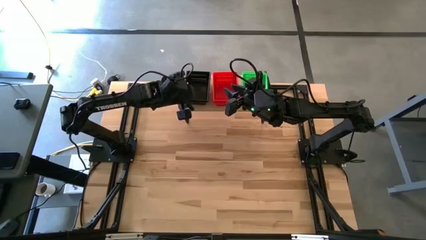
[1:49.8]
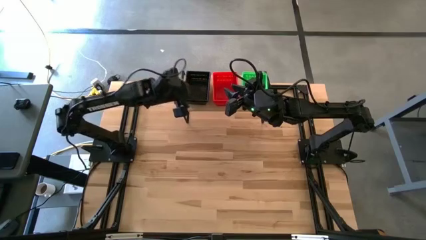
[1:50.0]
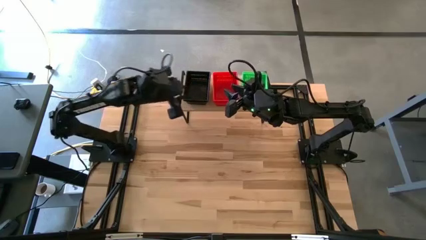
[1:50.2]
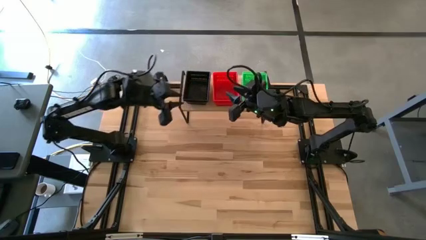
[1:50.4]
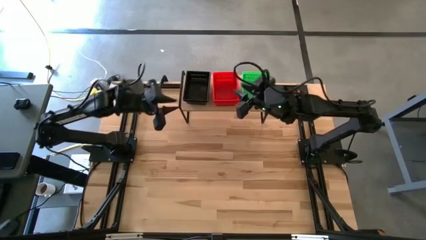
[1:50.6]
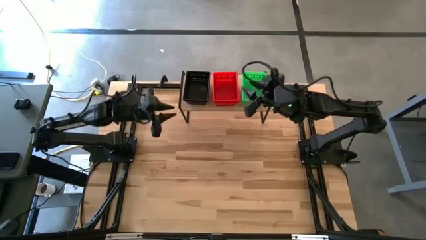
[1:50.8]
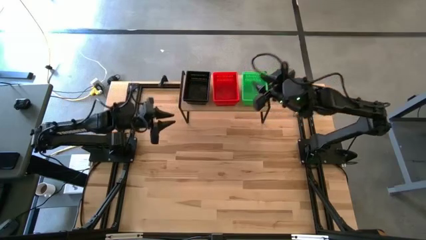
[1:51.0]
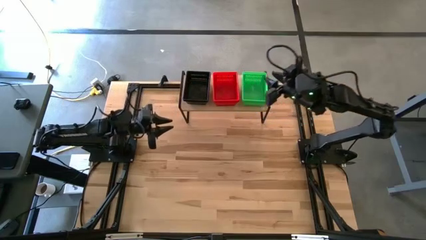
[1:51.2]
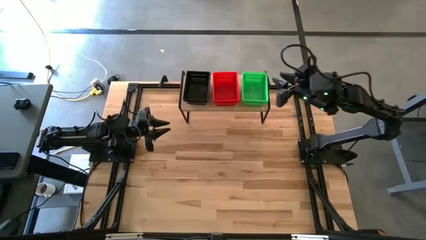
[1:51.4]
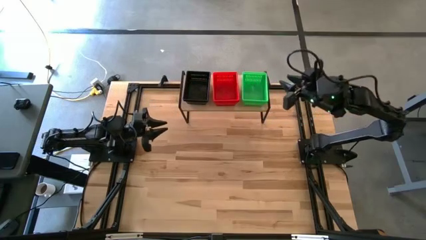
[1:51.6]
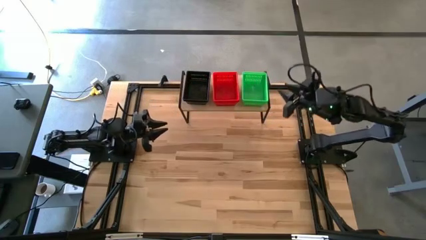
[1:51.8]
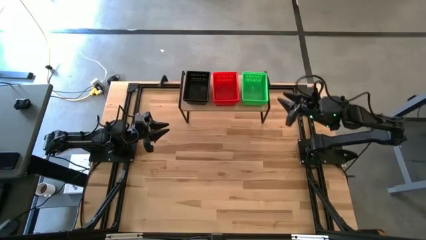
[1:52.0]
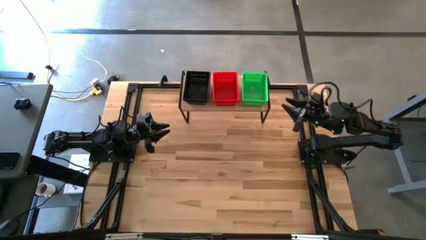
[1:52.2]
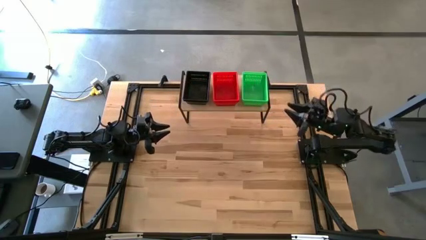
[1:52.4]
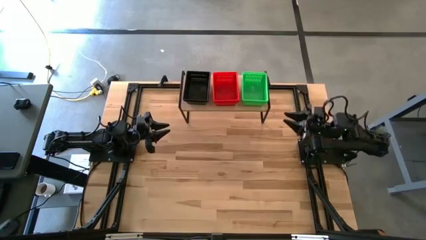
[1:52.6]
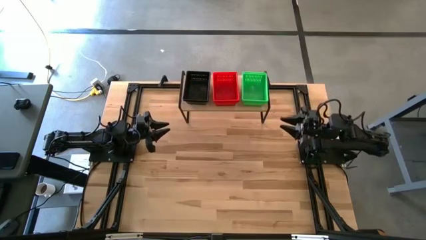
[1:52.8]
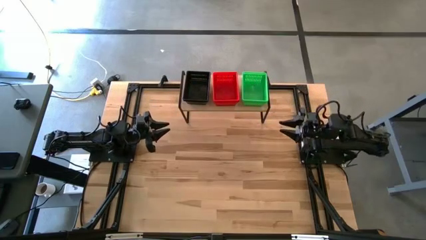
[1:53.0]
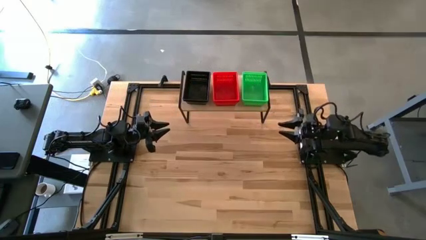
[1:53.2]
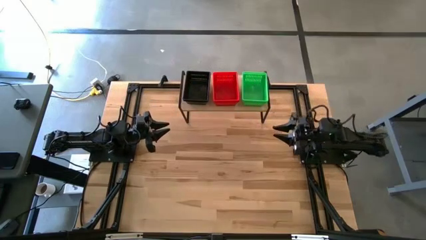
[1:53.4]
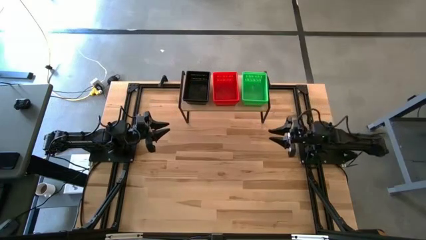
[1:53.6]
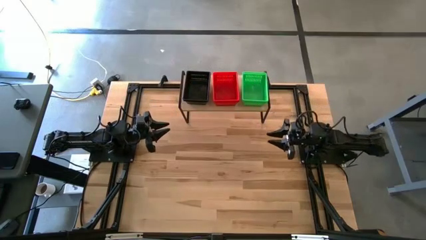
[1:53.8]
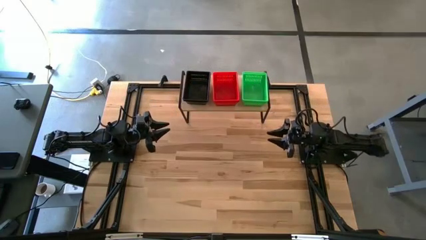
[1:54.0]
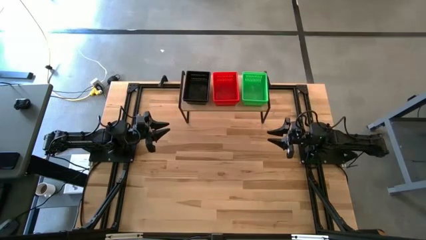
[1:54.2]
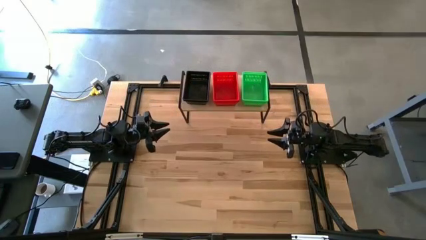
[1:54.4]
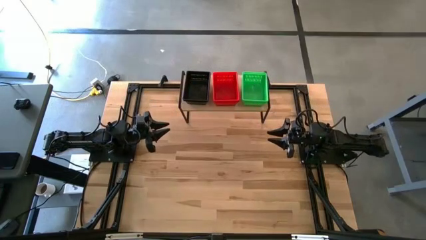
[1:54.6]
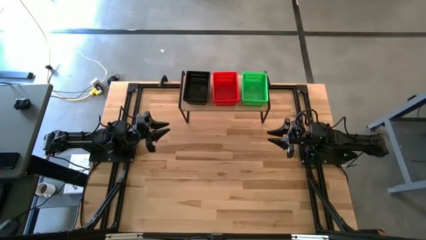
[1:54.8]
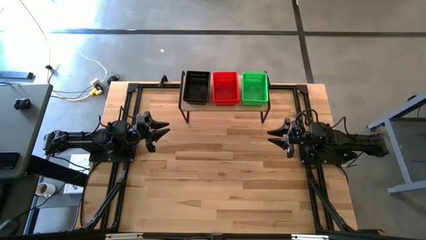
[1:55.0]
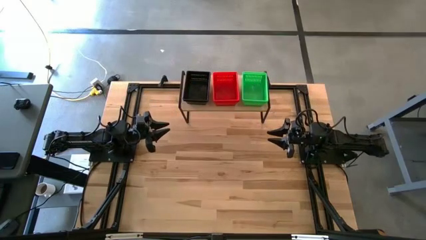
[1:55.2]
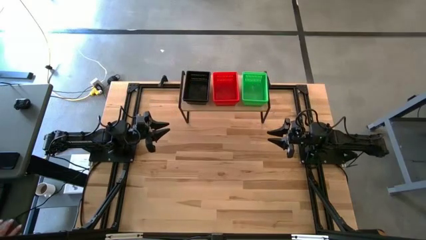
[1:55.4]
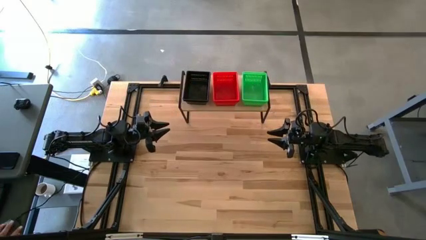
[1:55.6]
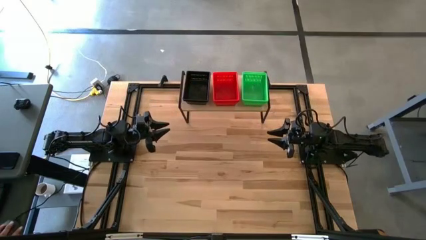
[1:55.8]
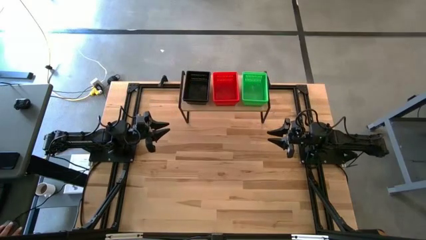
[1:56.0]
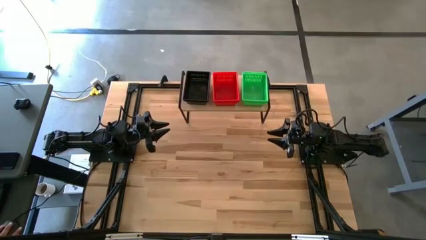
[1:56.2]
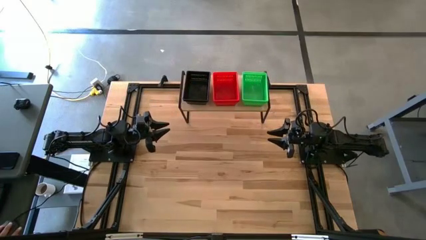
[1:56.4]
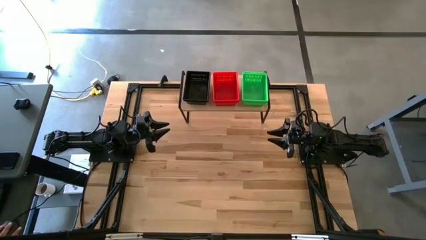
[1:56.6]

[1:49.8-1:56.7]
Task: Stack baskets on shelf by color
Return to Home Position

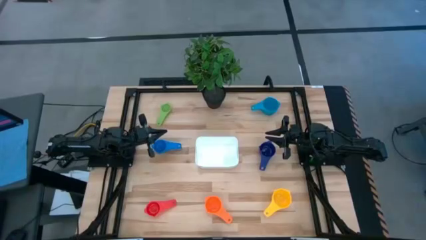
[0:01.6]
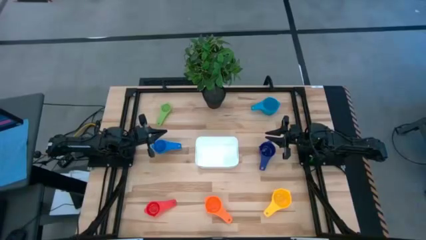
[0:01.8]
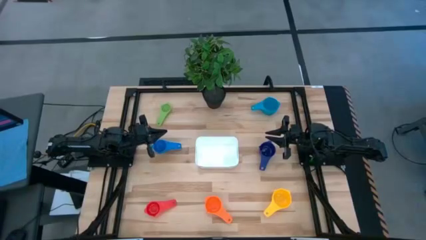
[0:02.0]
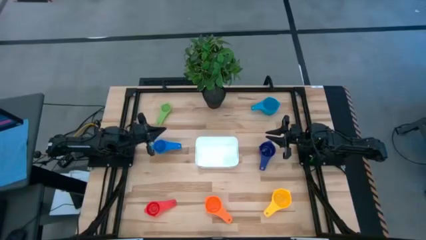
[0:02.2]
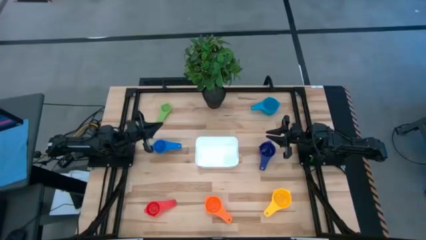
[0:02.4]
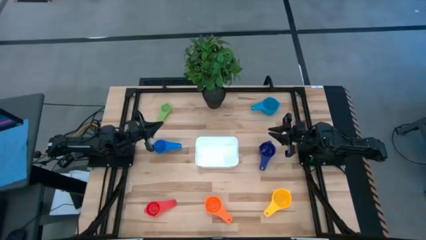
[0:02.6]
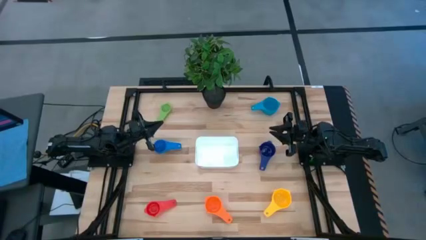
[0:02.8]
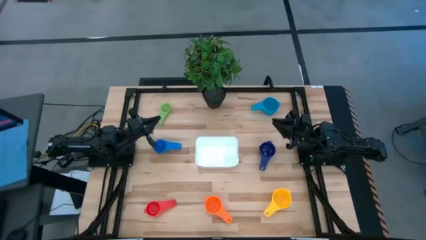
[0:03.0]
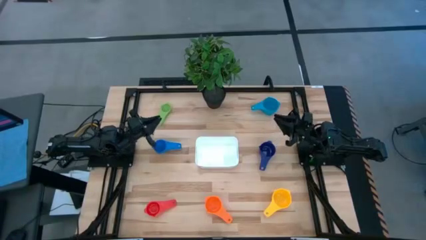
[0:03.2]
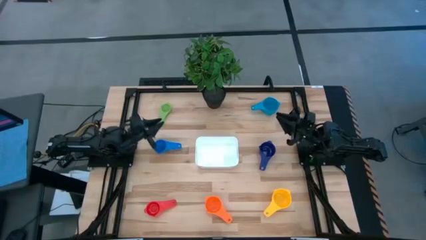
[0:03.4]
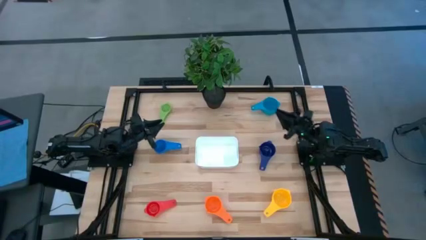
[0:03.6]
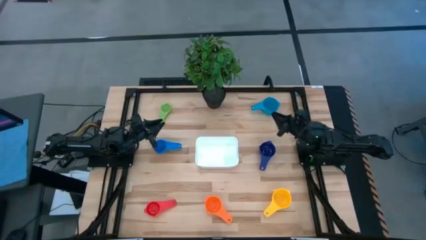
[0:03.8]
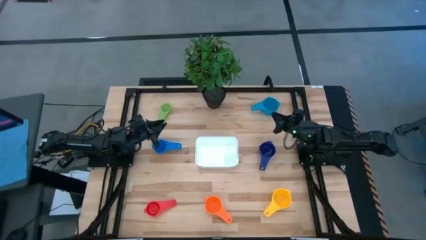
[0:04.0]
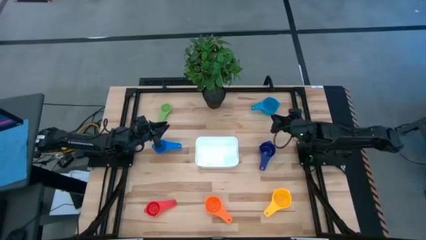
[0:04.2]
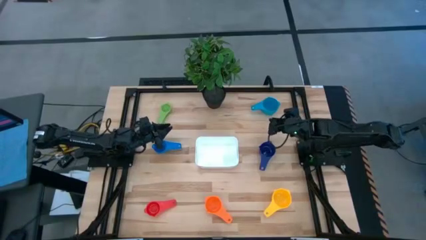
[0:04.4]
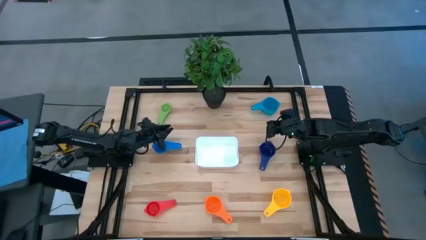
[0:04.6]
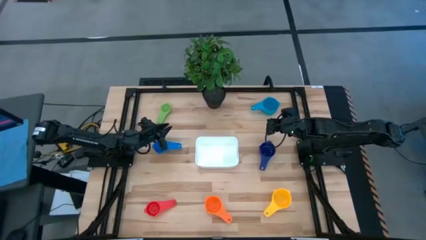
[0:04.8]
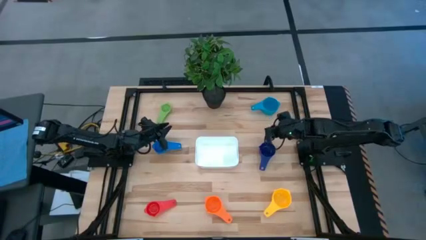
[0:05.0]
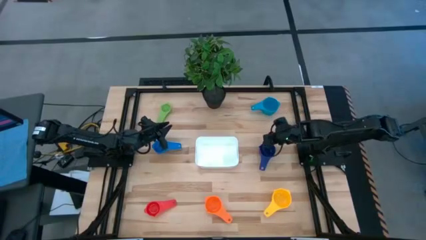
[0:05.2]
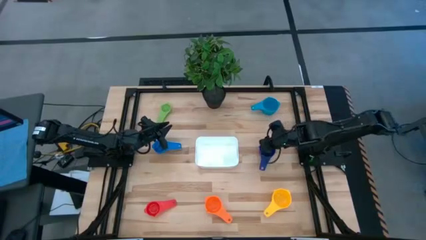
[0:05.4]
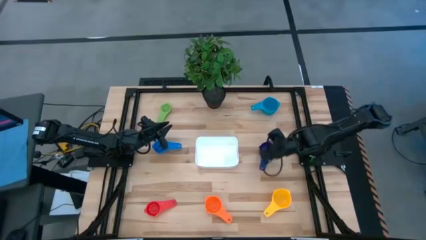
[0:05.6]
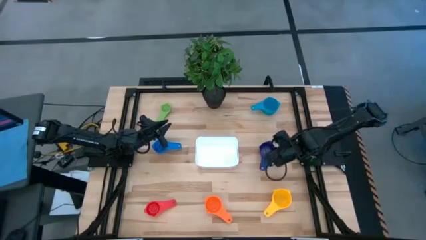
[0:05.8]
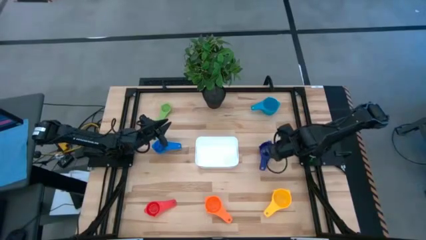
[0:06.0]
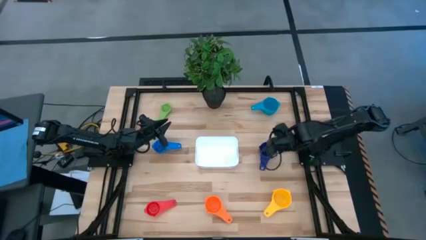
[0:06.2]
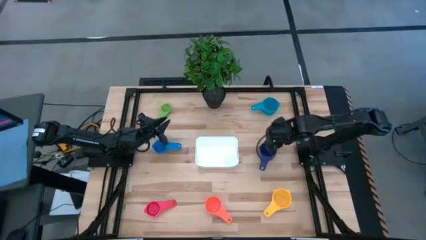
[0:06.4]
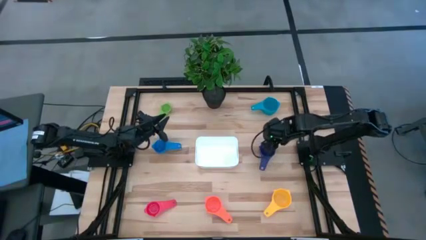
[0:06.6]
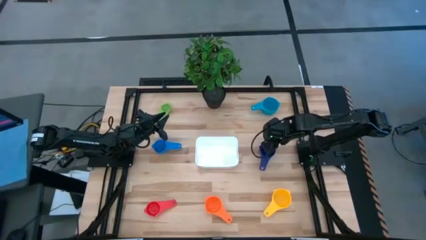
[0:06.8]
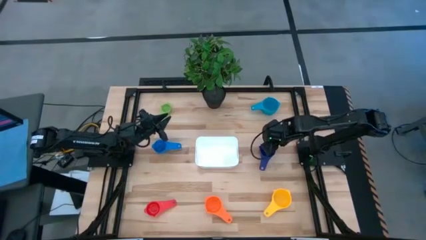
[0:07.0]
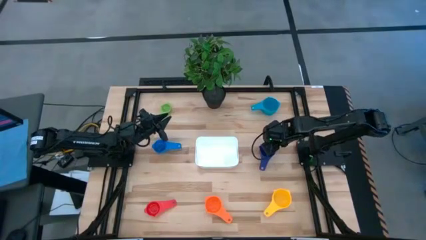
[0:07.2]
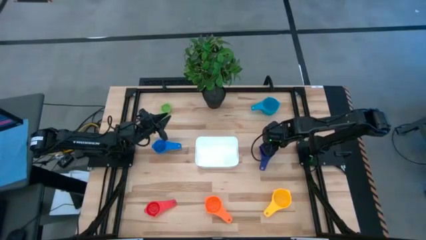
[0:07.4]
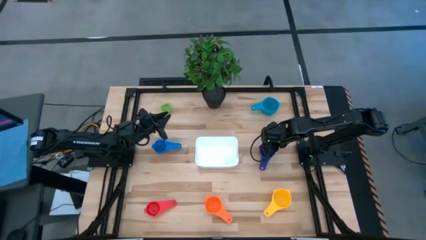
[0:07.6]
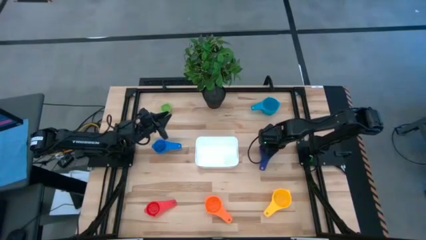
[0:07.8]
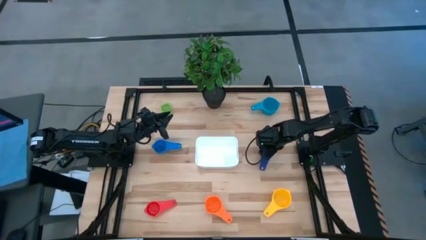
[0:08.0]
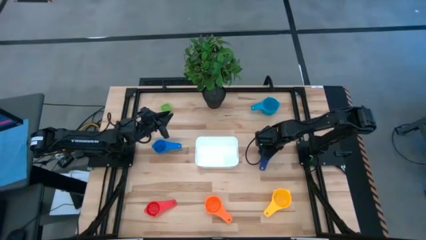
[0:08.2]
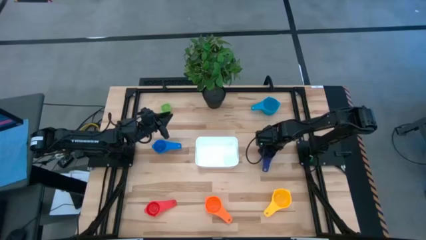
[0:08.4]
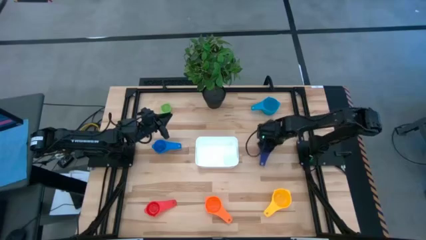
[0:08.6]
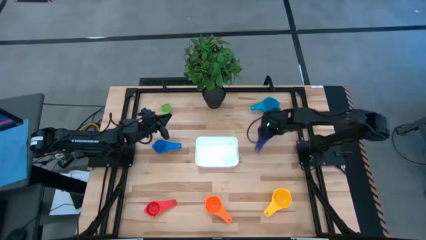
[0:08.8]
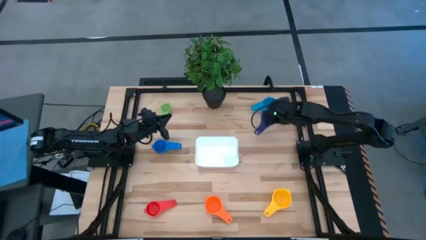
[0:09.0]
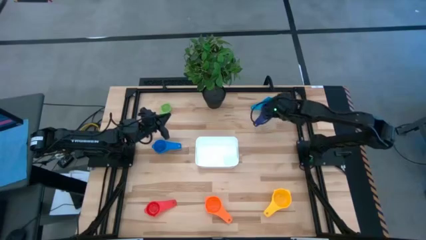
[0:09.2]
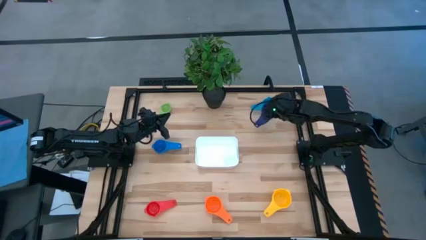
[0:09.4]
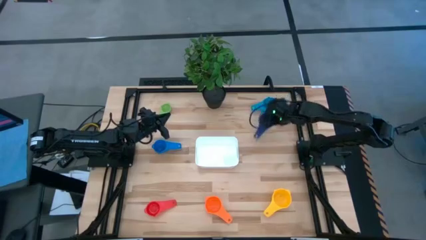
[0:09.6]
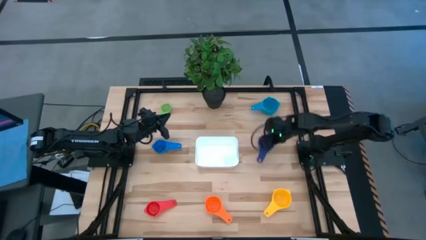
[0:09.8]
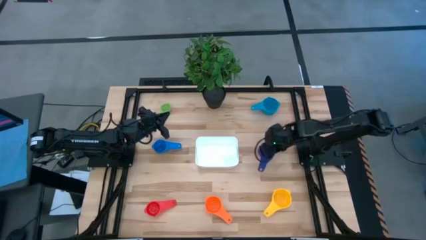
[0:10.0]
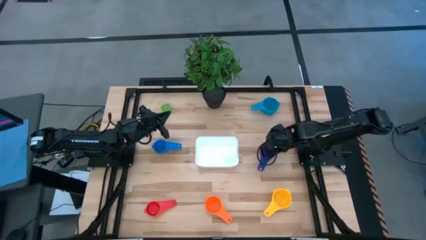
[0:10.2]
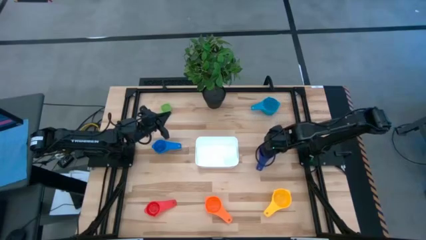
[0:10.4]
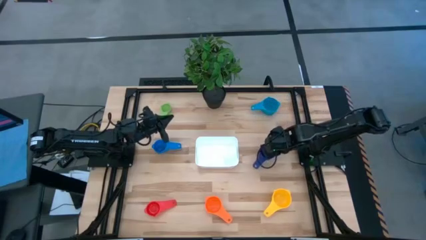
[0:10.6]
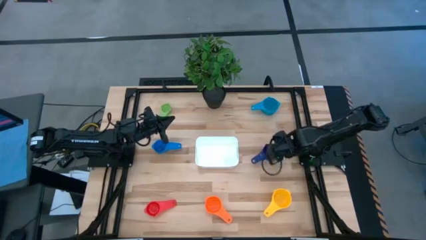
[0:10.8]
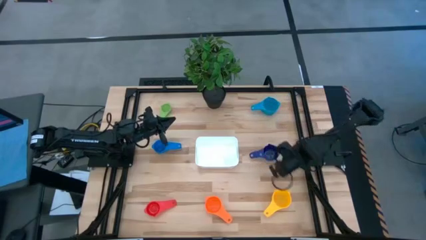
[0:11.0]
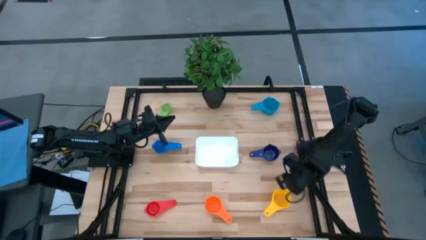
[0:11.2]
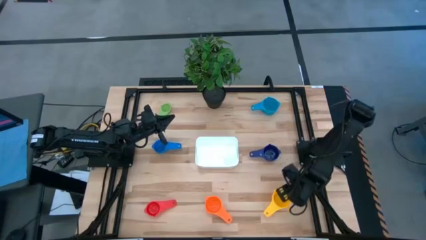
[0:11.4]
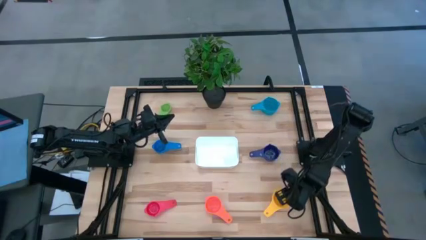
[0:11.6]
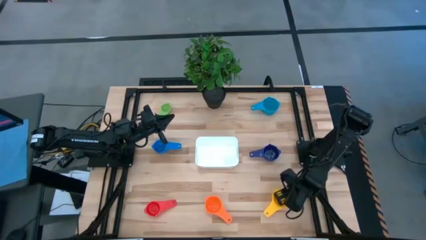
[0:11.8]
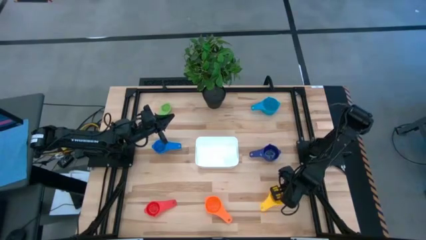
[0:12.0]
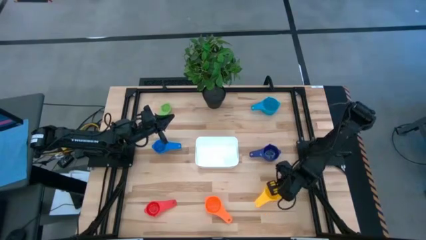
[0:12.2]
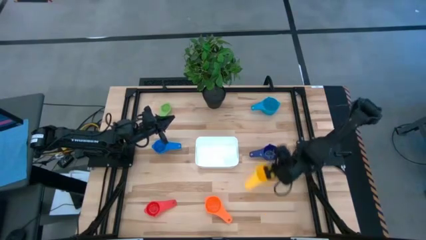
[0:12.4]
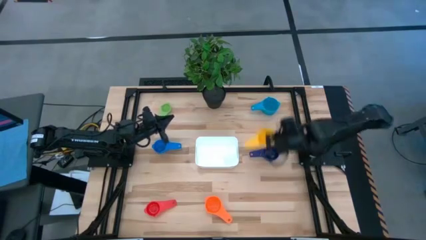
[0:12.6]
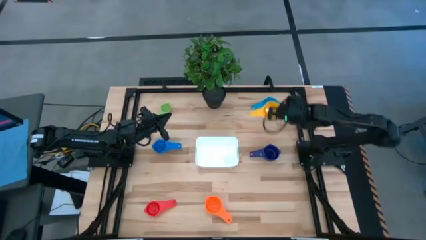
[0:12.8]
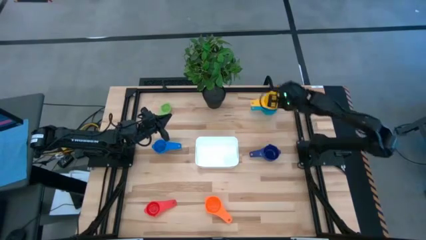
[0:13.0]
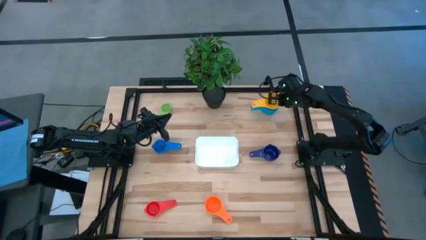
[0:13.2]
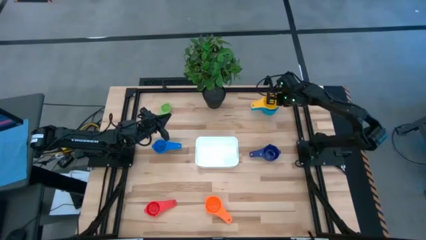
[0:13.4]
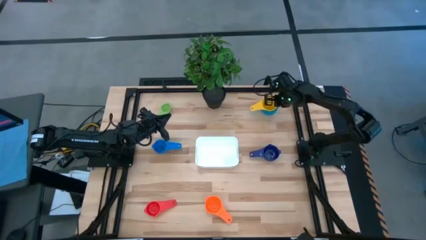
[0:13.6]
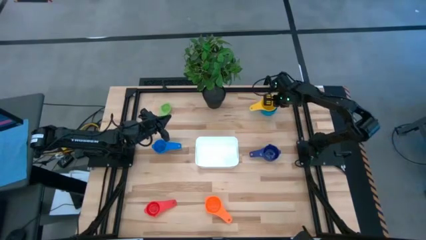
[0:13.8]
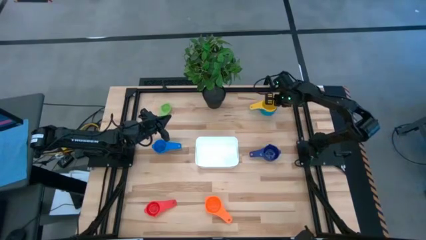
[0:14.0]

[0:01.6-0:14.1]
Task: Nest measuring cups in basket
Stack the yellow measuring cup on top of the top light blue measuring cup
